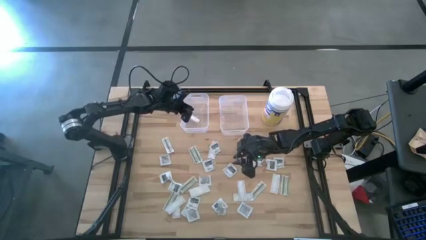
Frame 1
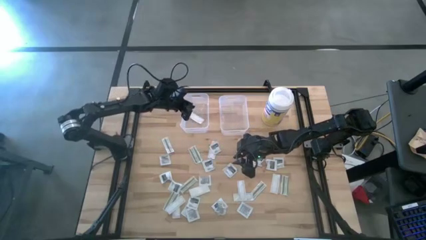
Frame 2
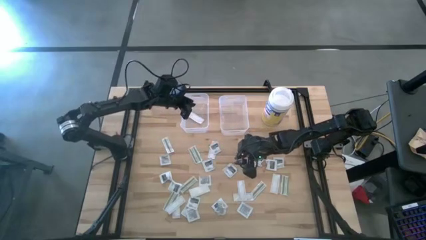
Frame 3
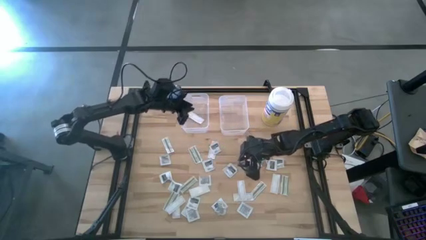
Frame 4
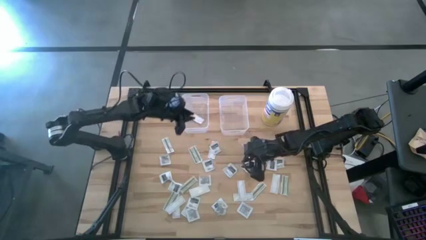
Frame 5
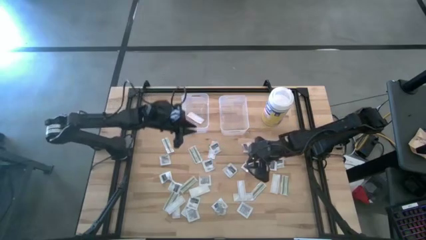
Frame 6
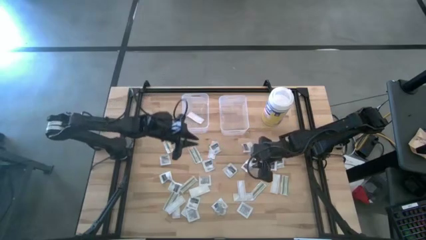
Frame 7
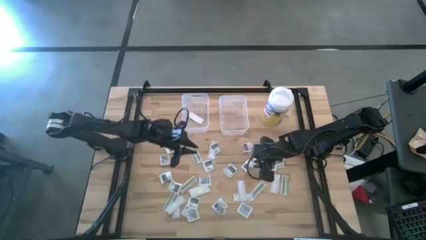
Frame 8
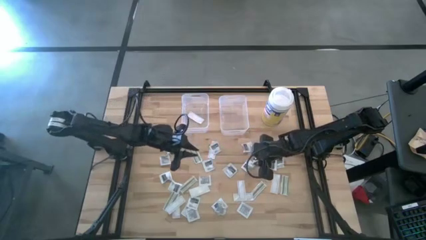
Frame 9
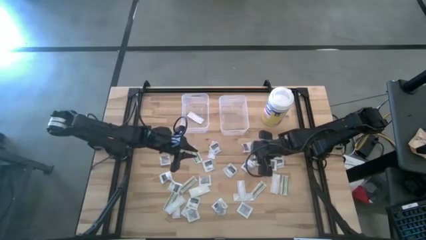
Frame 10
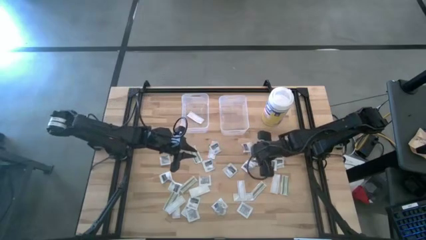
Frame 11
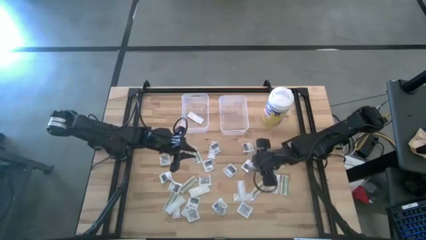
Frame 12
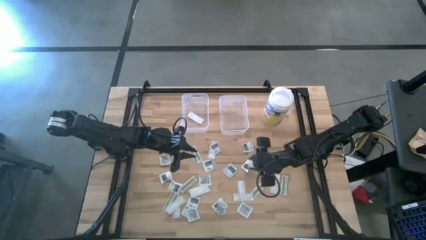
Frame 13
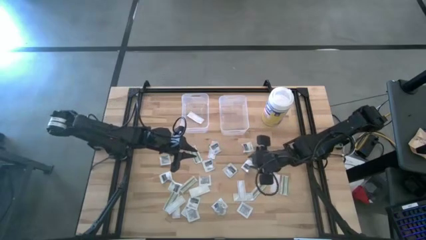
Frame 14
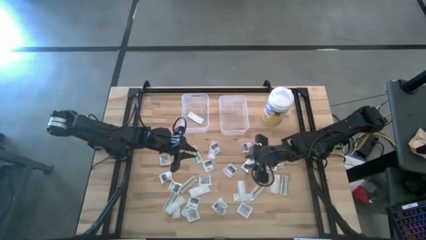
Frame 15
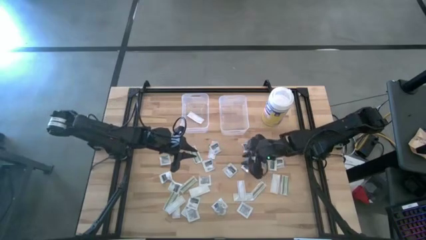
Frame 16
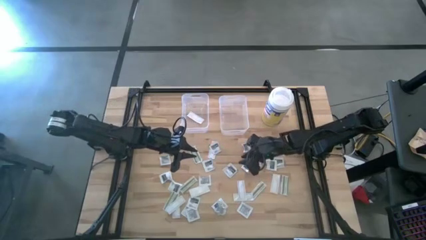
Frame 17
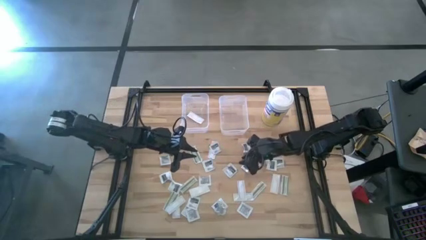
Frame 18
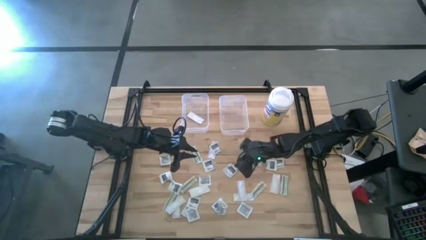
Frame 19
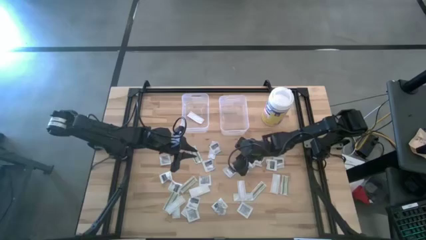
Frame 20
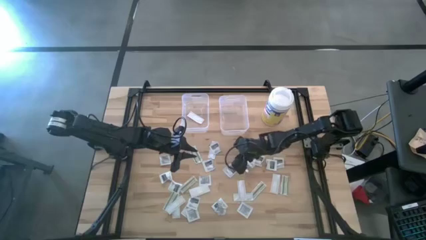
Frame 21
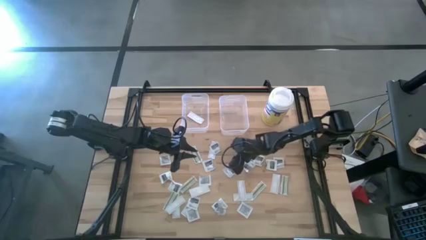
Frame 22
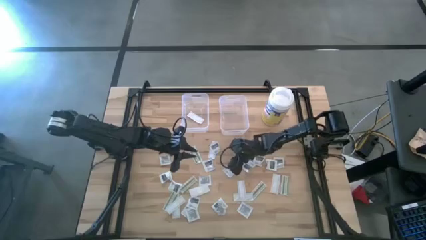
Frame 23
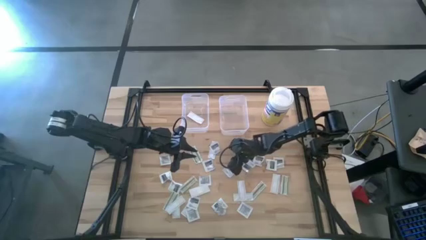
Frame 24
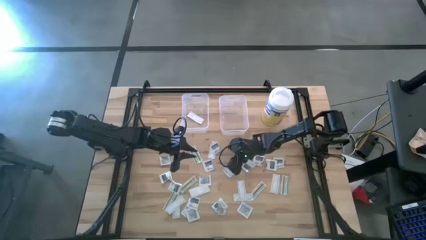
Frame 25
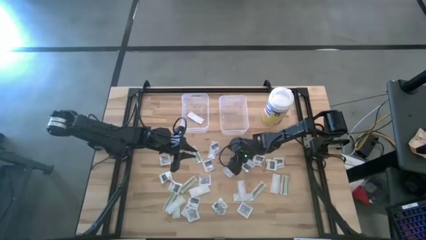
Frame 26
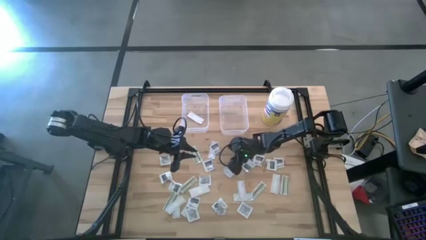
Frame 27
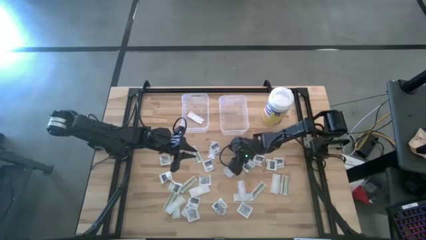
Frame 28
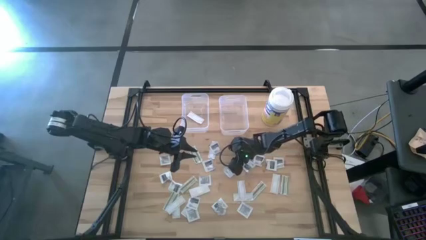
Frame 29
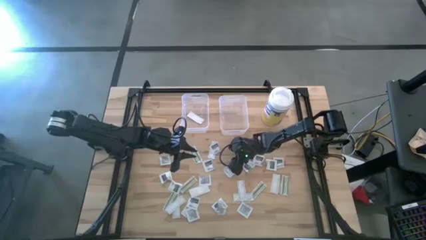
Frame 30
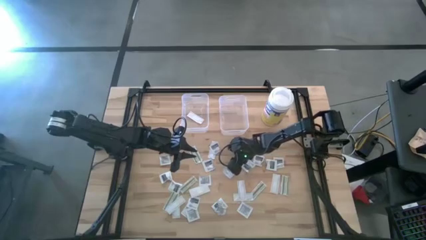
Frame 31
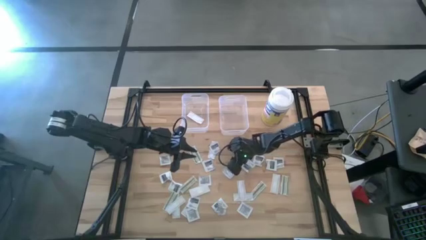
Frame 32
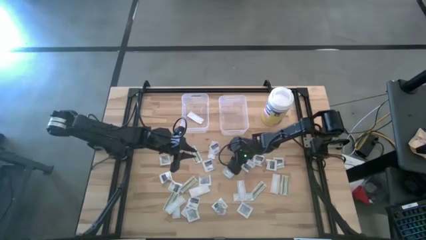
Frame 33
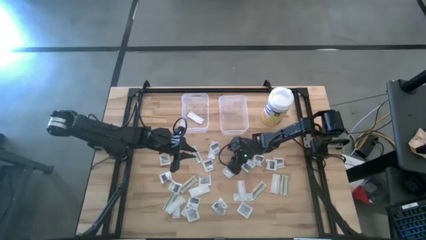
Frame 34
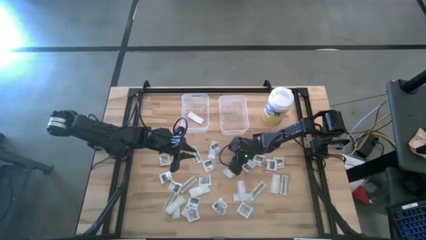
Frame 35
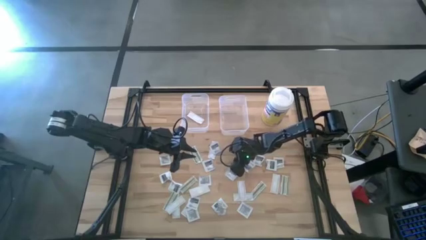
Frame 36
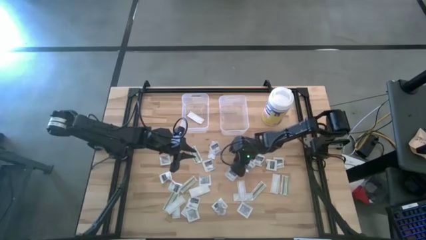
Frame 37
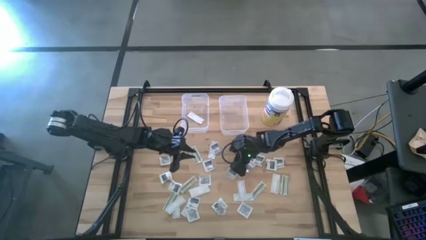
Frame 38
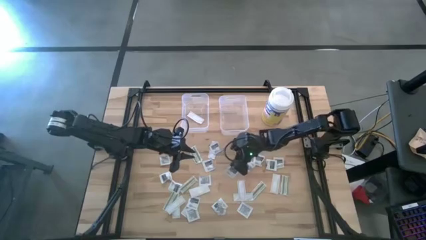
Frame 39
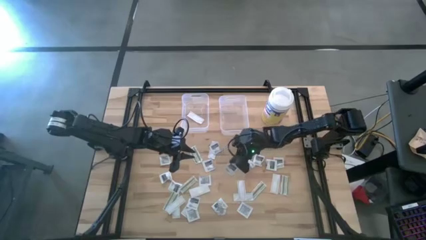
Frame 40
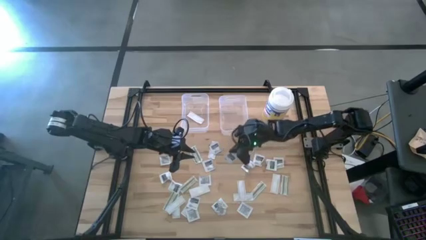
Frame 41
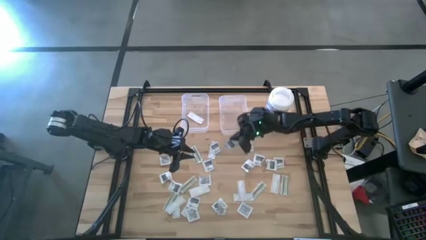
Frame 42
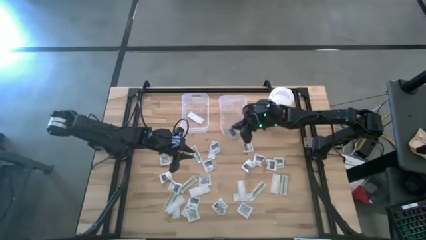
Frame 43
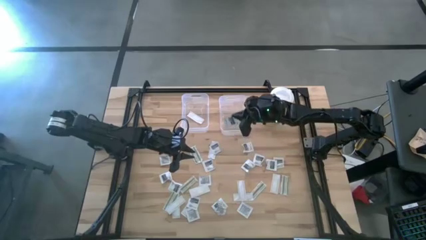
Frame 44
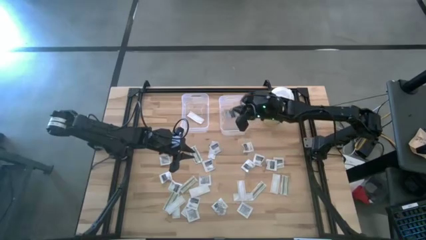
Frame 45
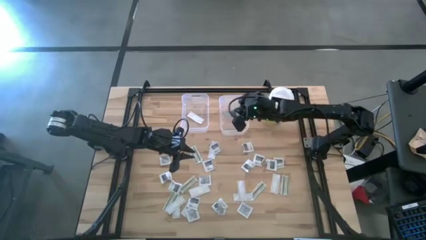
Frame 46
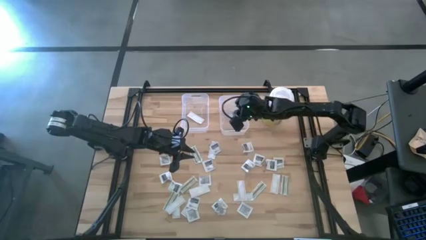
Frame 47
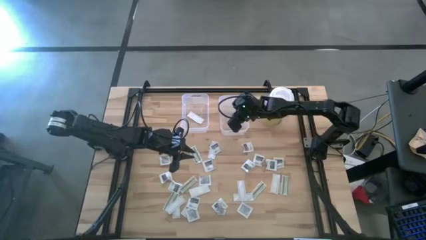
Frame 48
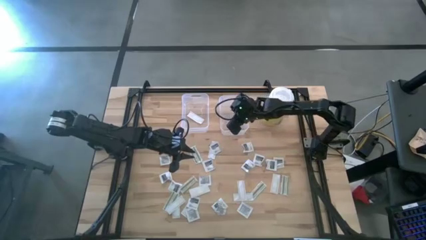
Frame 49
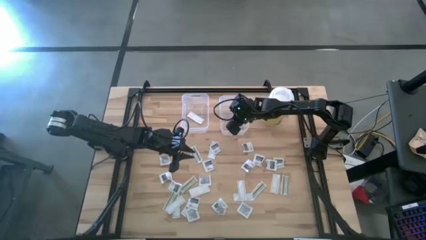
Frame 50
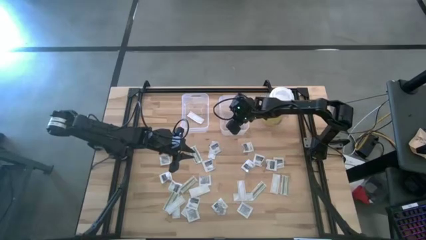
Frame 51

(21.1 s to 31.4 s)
Task: Pick & Place First Aid Supplies
Put the gray towelette pack into the right transparent bin

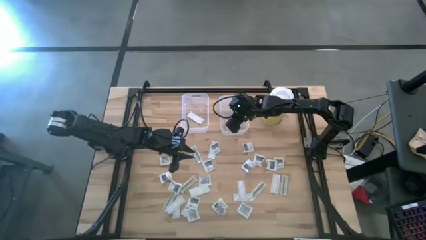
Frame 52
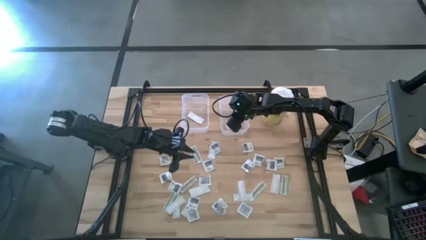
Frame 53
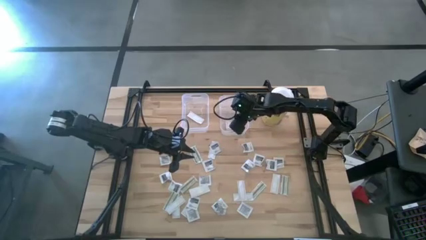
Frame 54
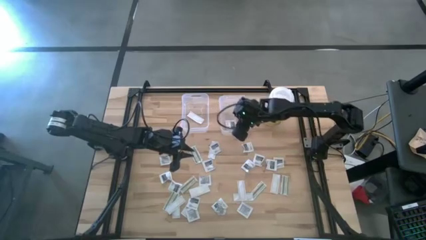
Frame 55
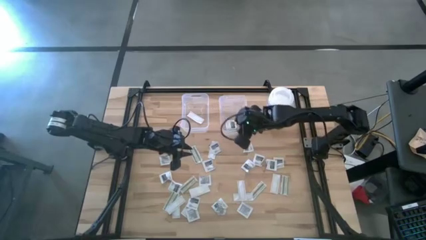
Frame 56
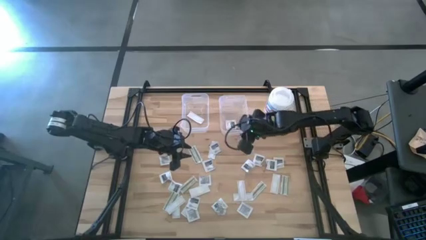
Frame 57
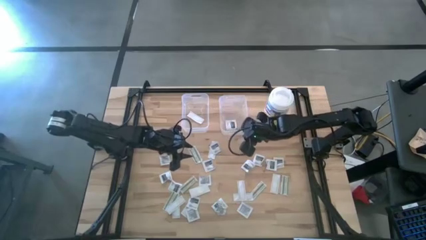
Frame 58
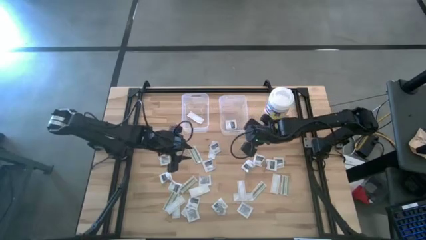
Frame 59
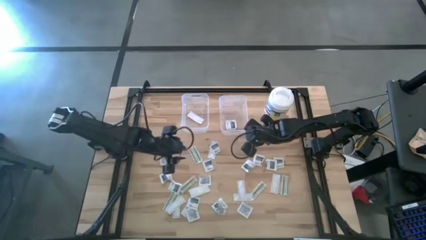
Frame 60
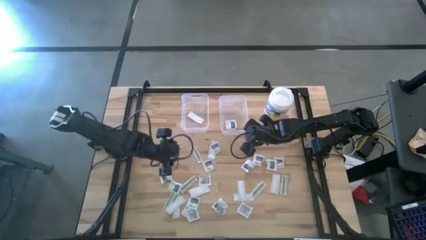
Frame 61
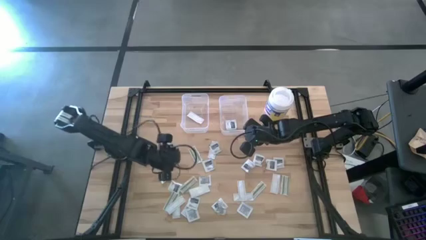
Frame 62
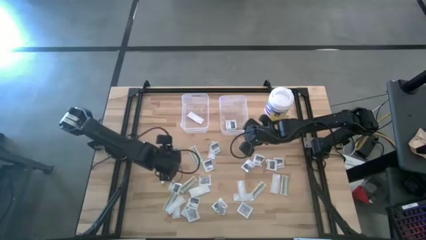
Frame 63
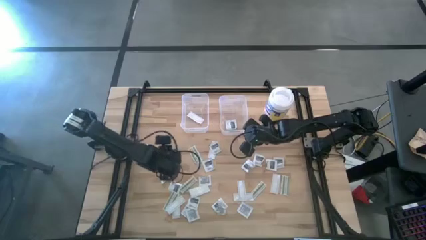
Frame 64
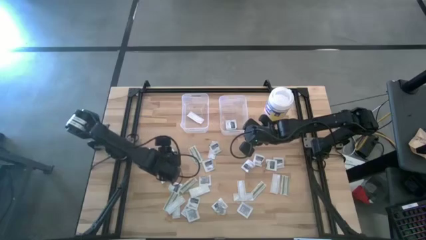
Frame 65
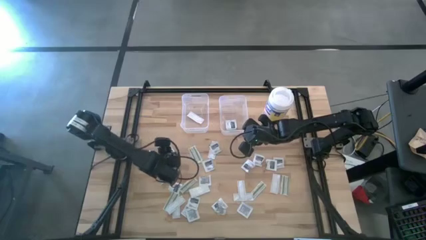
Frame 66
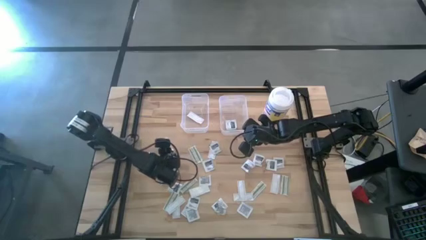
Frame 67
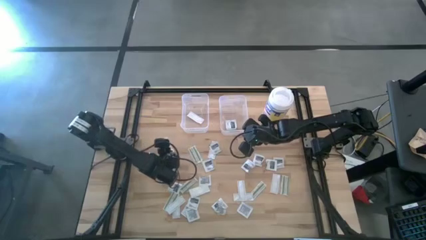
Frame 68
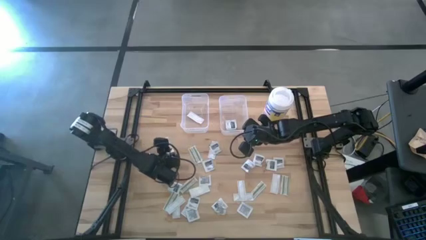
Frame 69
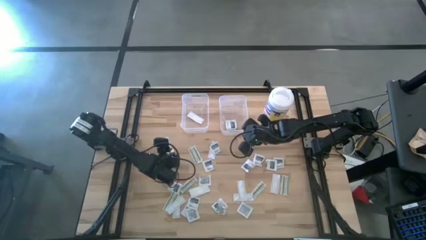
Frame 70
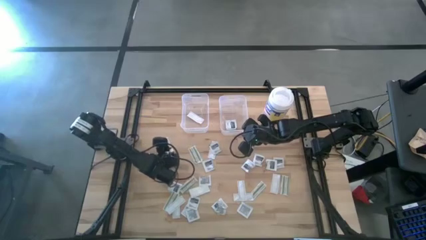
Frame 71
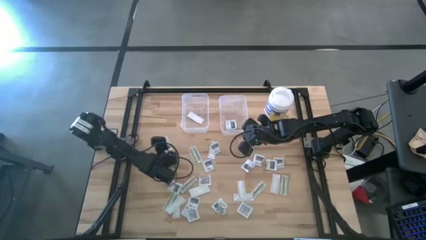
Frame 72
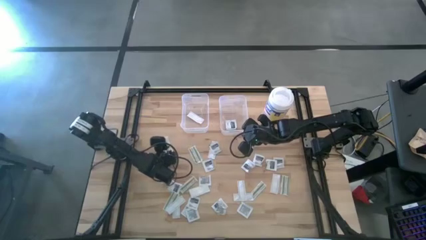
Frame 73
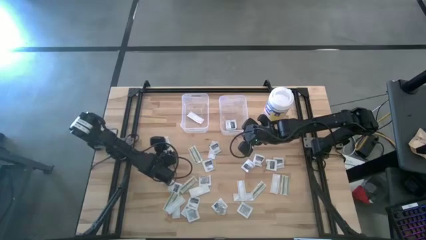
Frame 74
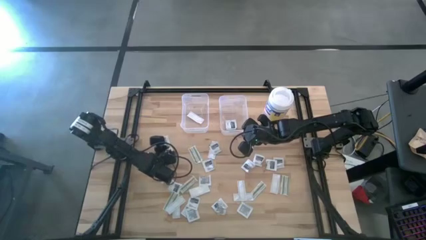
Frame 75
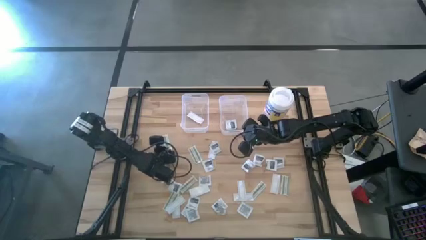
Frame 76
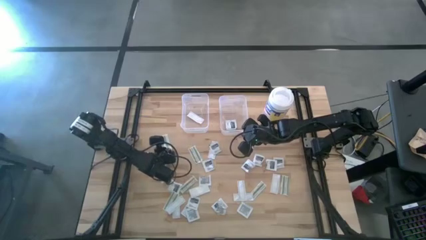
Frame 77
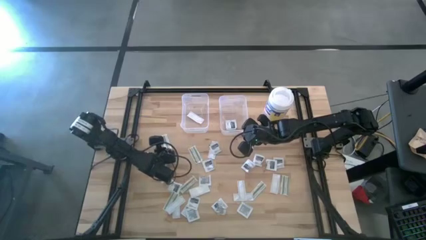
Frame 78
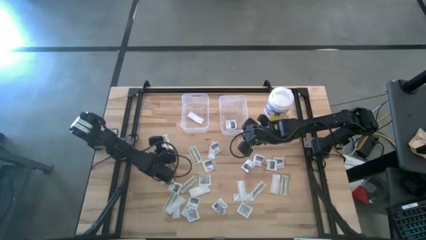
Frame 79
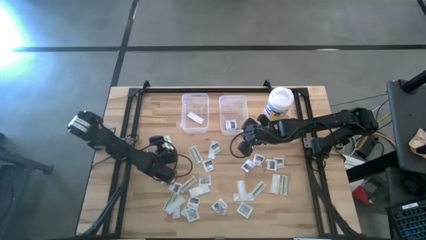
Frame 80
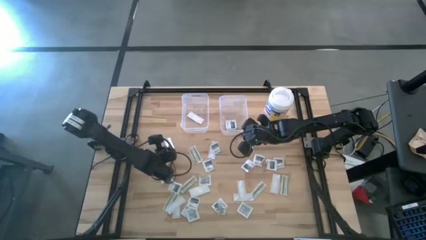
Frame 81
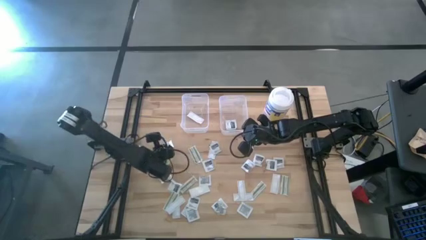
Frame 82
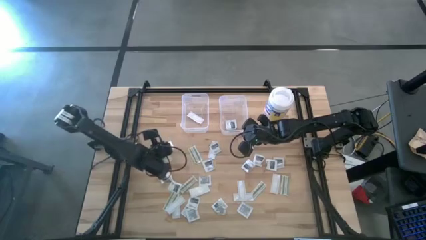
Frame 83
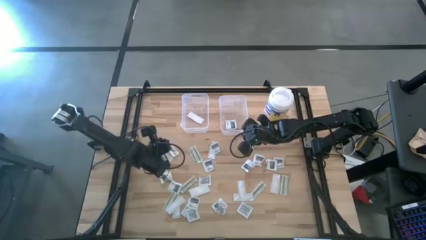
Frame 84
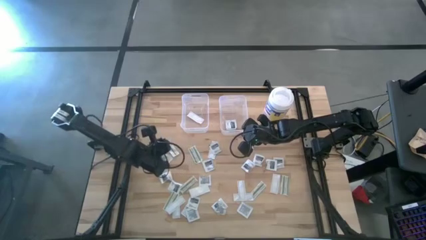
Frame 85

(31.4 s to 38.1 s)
Put the green bandage pack into the left transparent bin
